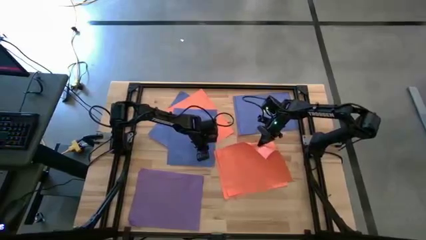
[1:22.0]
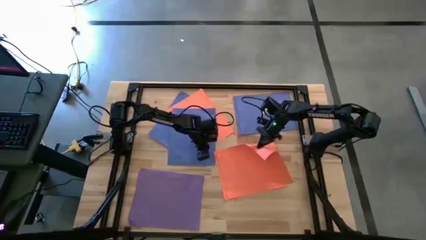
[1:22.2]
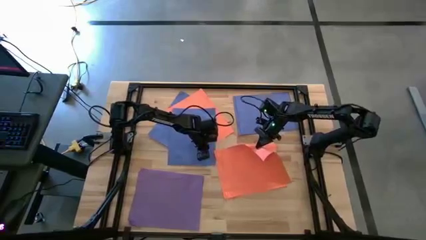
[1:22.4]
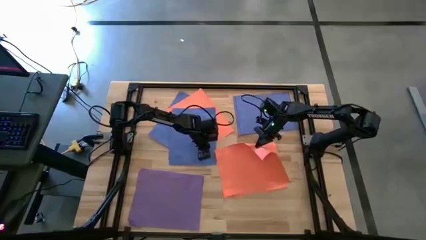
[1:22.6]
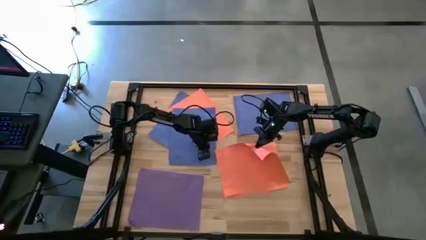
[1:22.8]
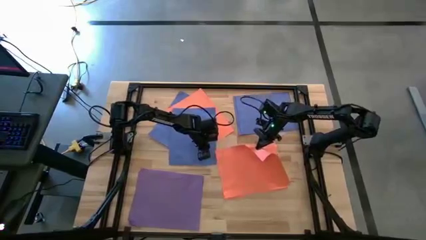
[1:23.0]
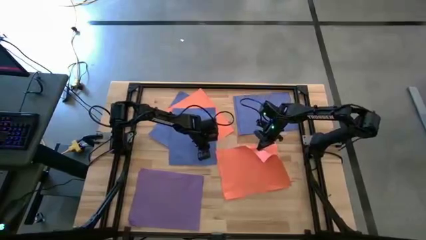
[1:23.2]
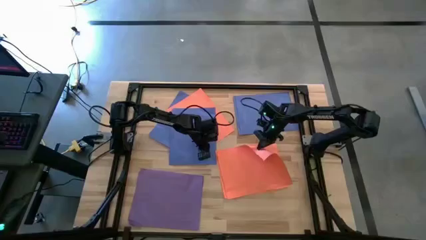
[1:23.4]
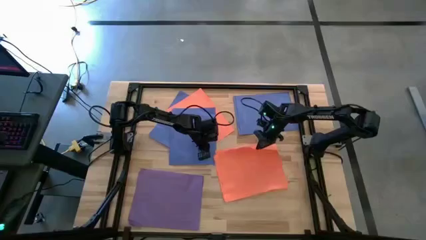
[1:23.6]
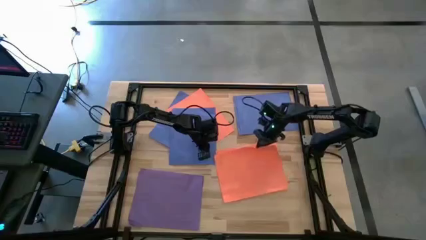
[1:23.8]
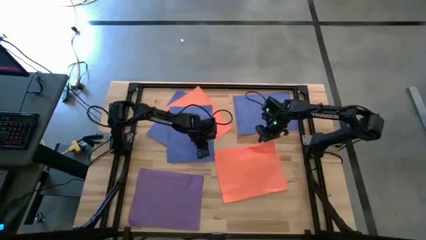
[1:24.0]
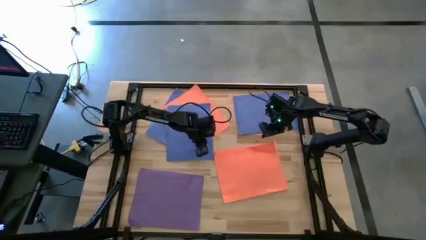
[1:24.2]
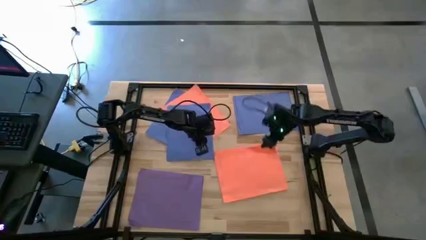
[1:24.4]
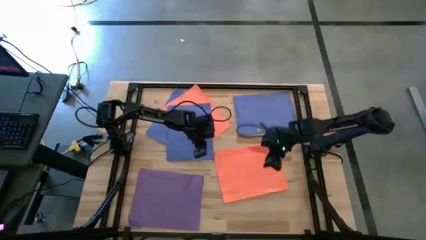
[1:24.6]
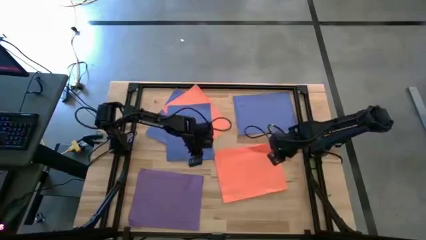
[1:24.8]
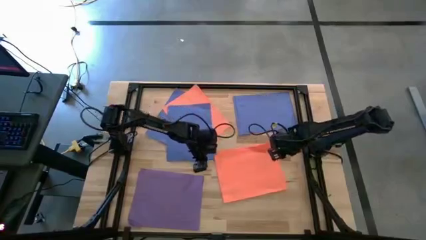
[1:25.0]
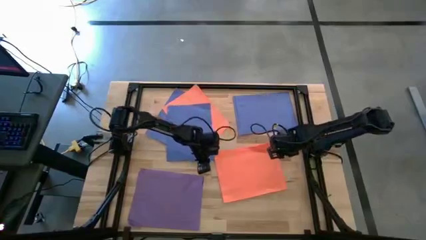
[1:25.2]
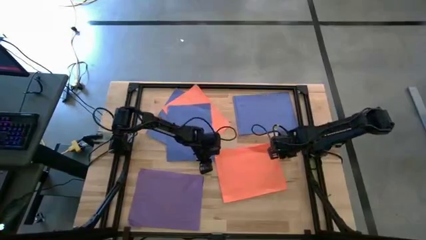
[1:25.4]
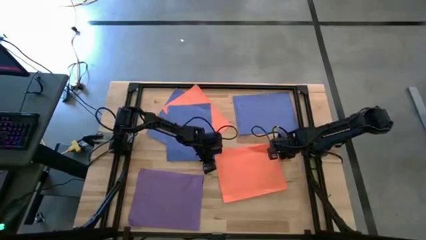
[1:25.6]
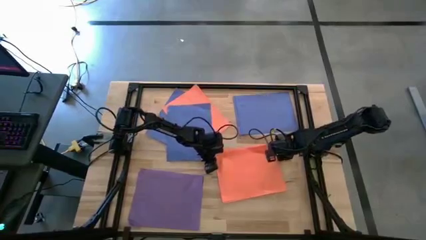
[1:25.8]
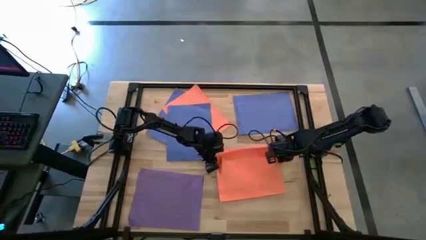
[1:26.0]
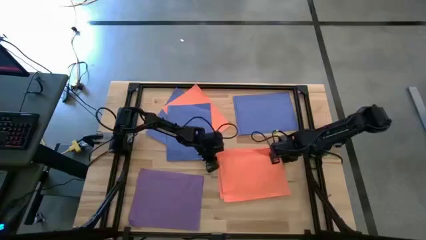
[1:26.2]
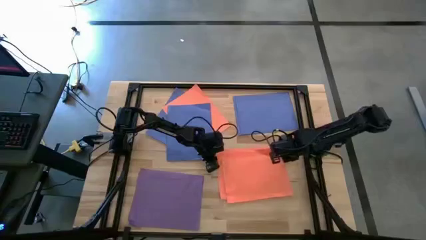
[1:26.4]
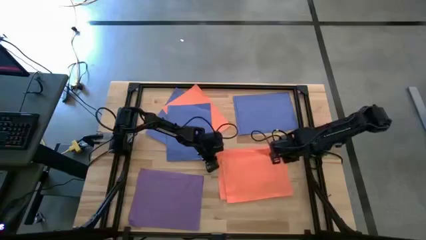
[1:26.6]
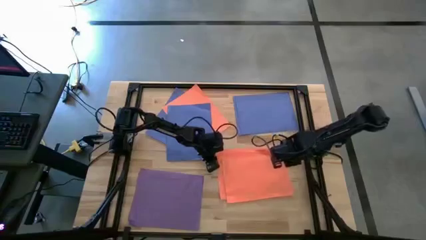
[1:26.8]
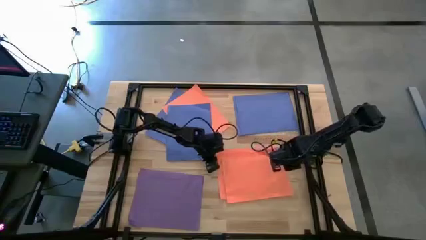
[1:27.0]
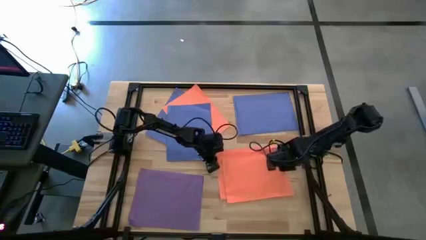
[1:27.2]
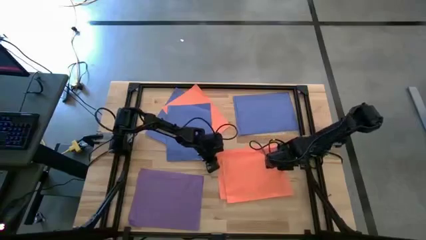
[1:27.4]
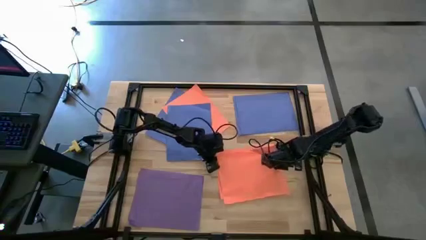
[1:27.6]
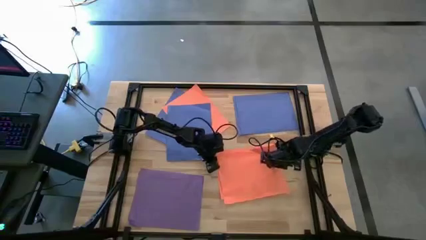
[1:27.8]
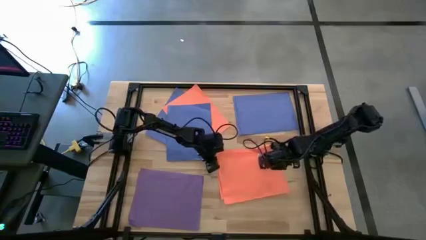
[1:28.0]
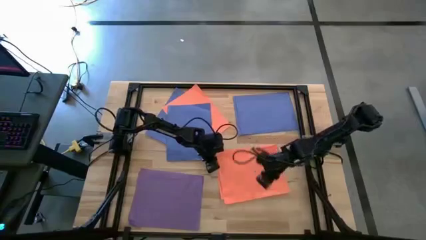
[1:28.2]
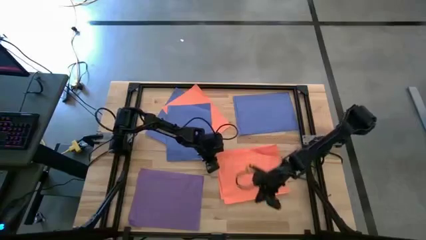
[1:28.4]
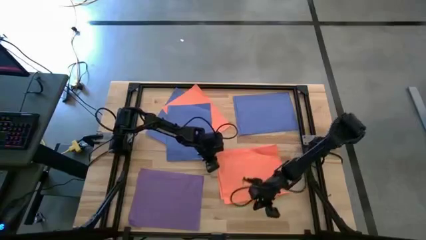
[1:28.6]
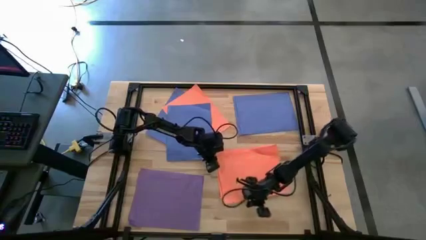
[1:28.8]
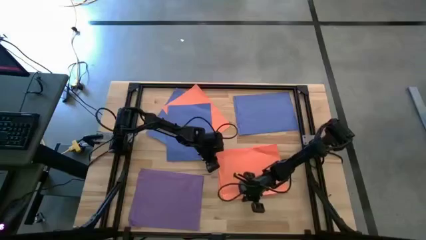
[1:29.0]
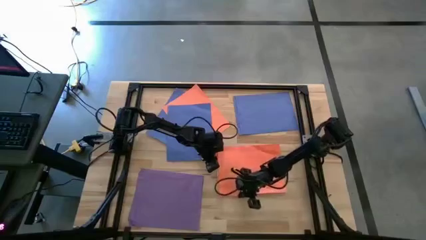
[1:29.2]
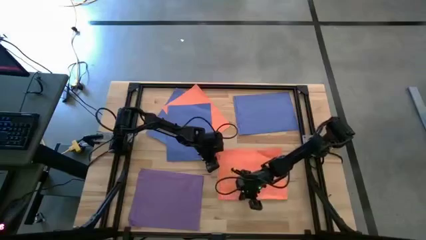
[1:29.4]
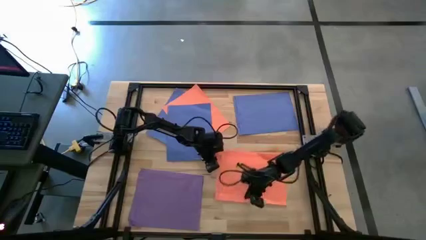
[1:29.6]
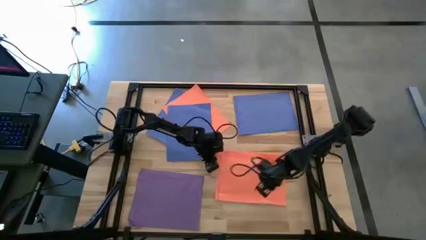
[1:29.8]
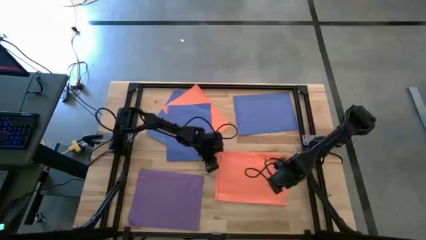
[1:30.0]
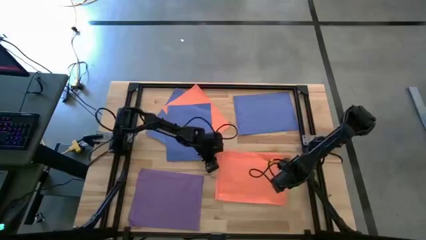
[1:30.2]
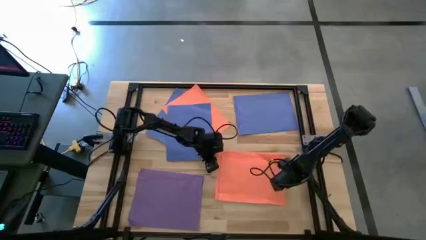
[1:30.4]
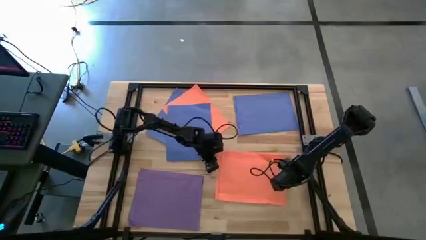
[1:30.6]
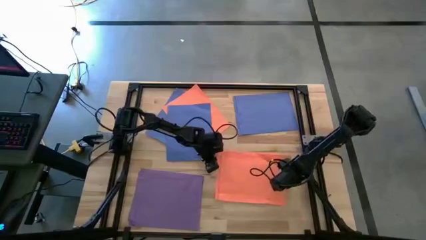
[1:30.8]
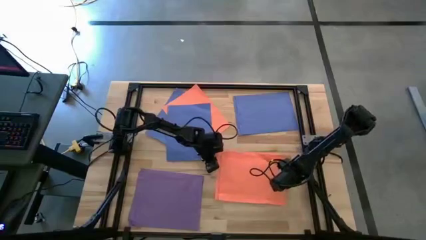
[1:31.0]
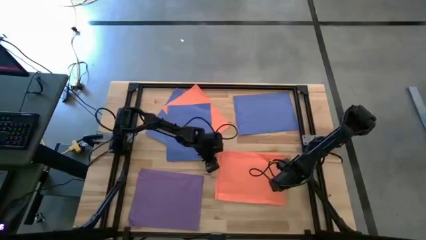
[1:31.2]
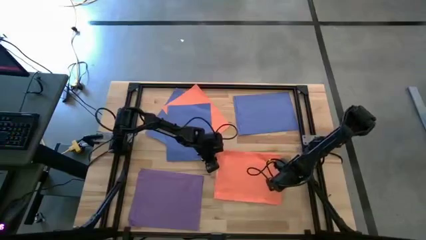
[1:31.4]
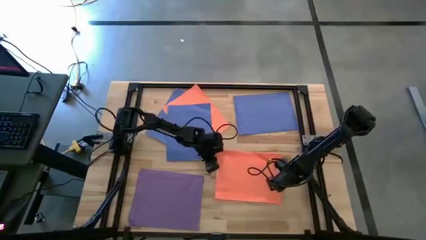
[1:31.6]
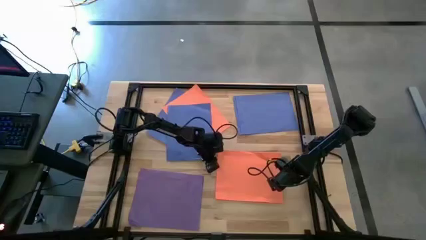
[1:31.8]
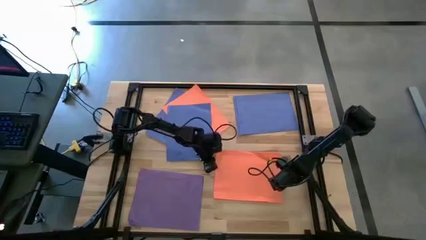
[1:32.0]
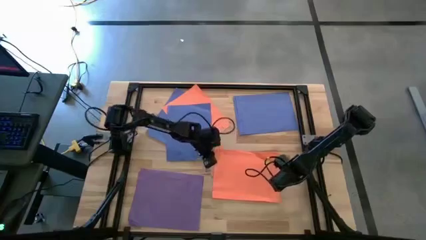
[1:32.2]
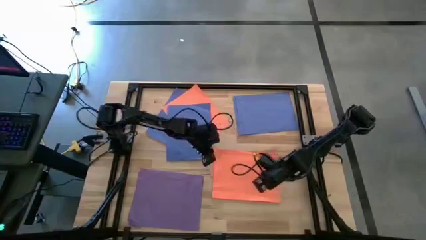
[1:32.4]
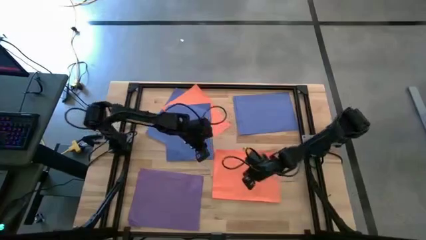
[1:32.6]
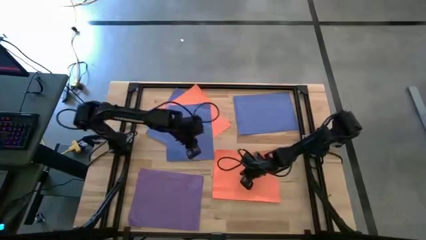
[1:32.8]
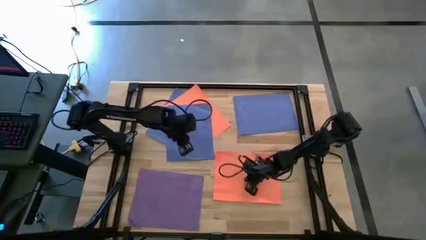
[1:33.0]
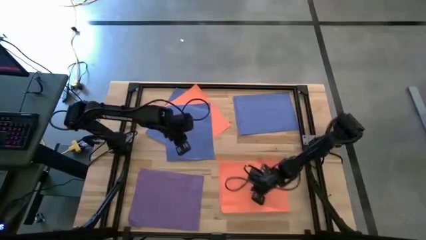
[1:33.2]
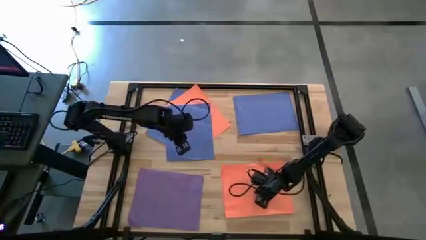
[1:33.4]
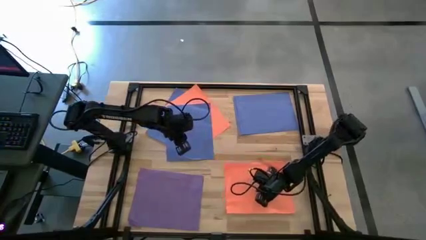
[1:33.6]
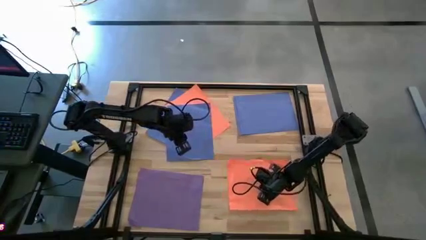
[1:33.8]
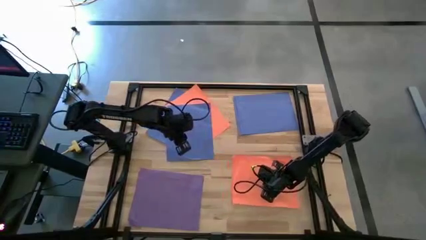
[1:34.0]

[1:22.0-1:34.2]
Task: Organize paper
Stack the orange colored paper on top of the orange colored paper

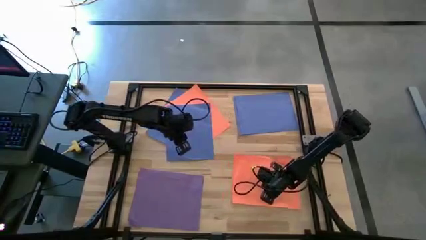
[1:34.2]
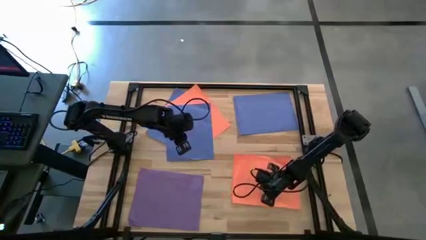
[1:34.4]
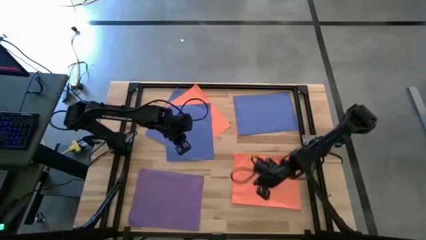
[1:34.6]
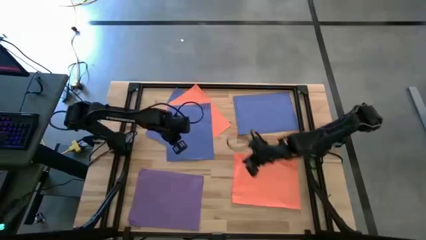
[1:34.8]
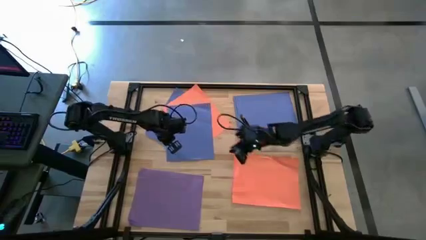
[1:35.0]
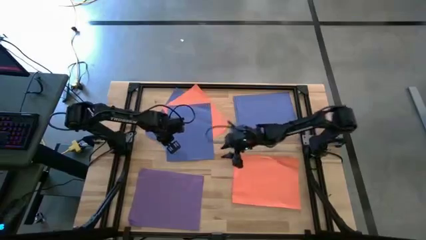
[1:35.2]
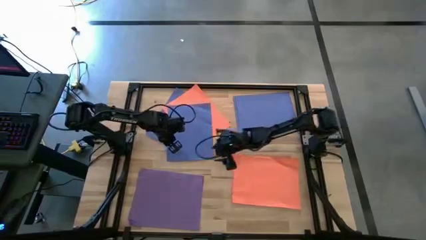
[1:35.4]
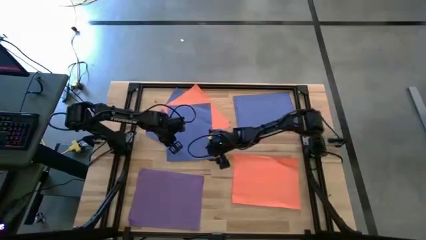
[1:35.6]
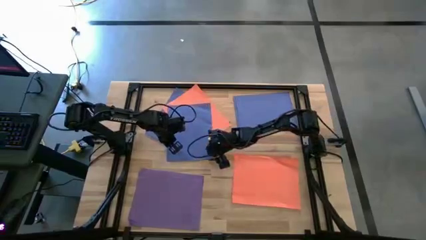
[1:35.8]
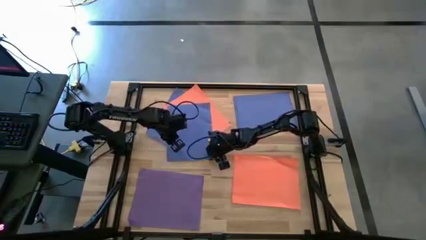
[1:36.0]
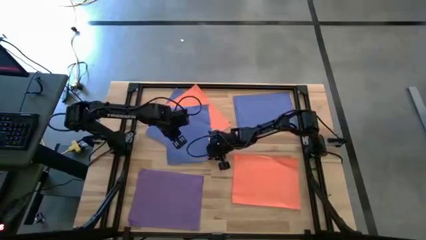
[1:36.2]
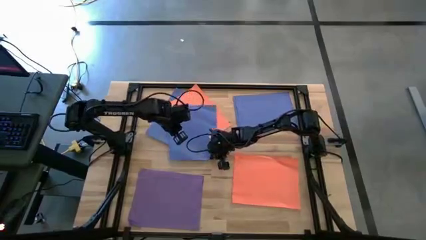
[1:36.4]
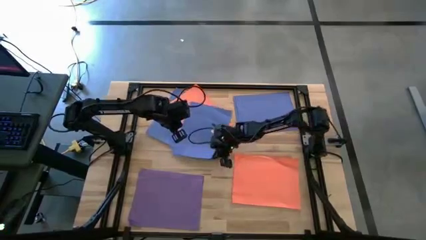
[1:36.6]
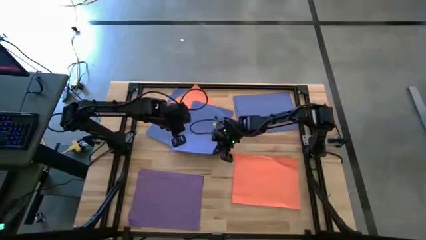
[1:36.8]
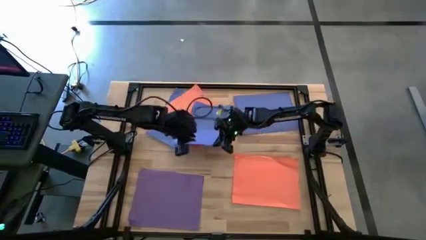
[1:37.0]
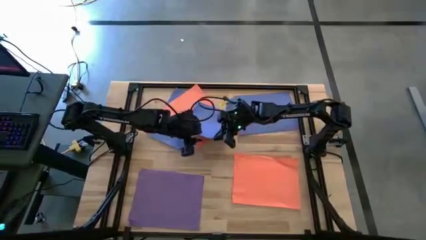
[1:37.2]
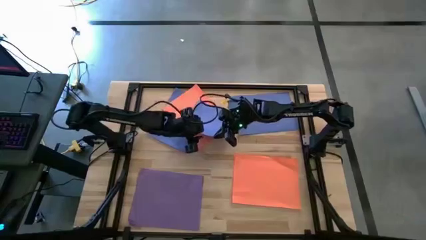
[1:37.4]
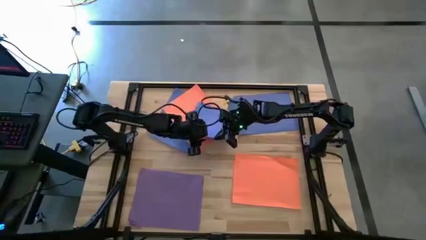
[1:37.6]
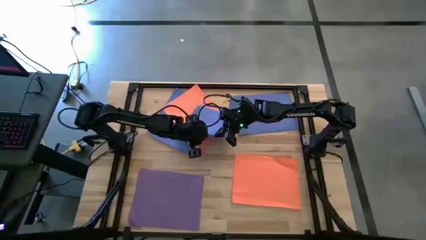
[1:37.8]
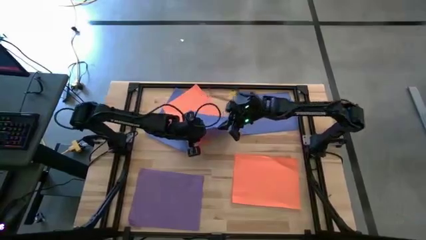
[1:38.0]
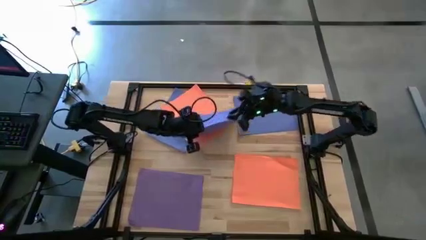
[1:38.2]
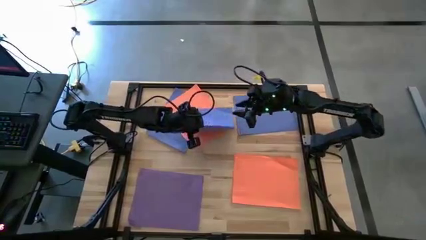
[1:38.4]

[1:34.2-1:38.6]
Stack the blue colored paper on top of the blue colored paper

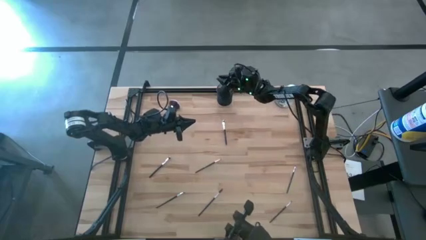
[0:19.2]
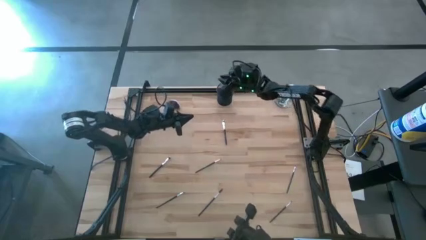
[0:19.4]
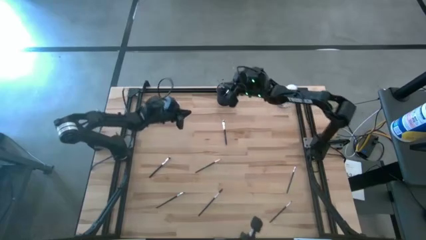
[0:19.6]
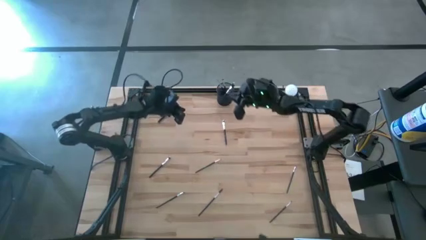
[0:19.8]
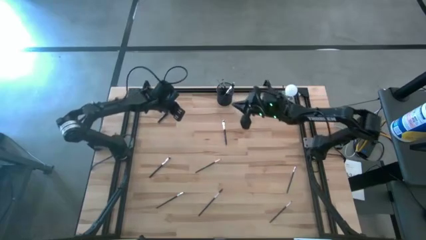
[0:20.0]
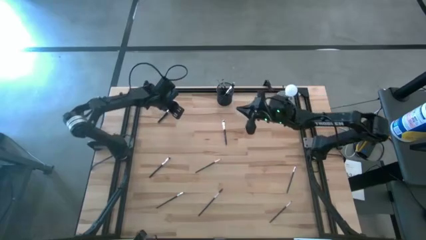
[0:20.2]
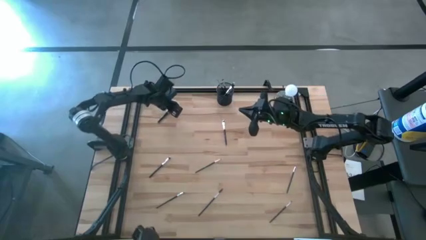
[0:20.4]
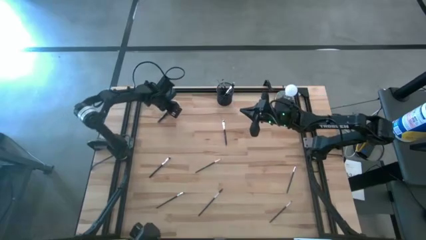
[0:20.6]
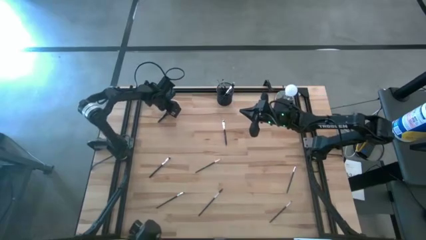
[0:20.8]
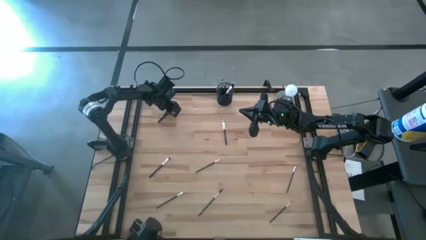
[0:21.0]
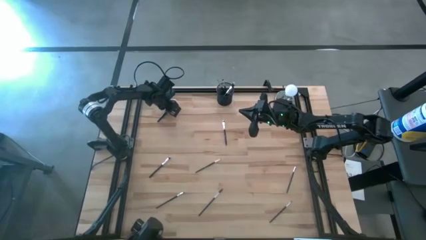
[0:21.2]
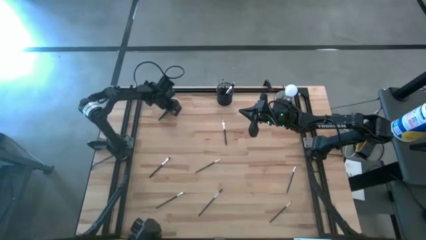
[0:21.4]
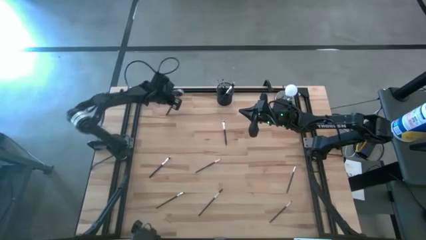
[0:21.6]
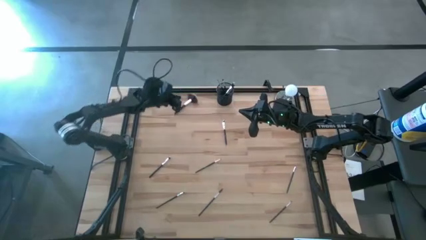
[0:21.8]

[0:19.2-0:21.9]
Task: Put items in baskets/containers
Put the black highlighter brush into the black pen holder
